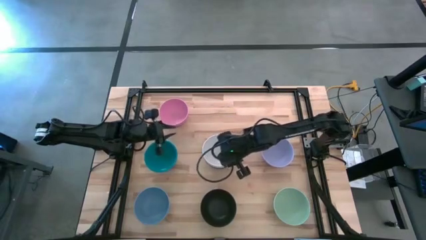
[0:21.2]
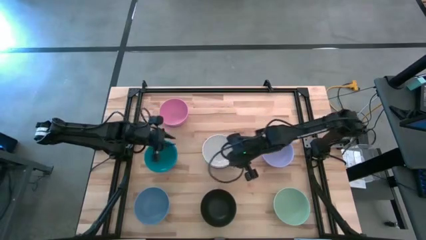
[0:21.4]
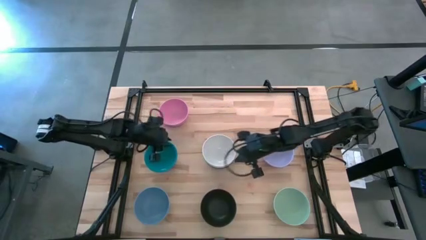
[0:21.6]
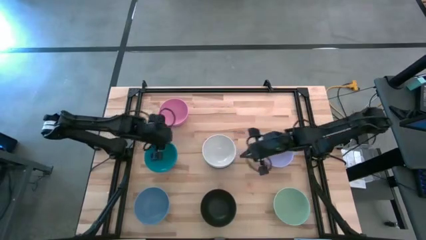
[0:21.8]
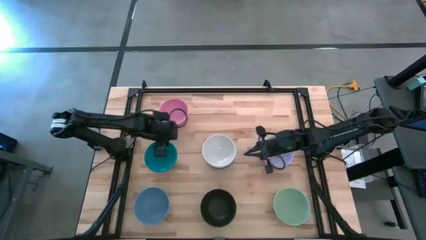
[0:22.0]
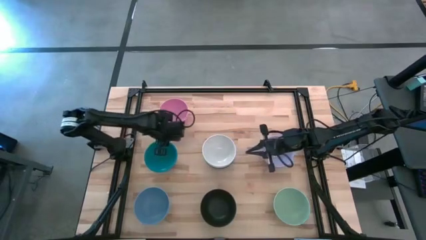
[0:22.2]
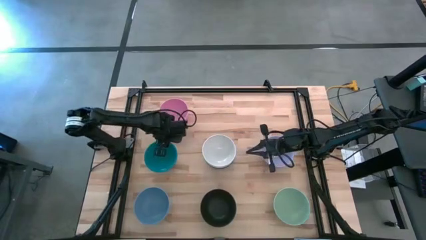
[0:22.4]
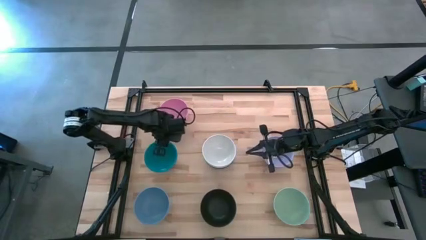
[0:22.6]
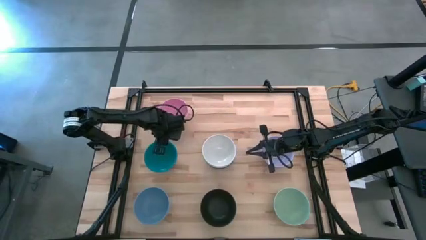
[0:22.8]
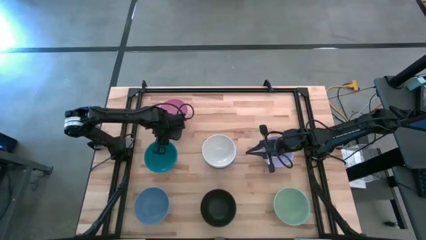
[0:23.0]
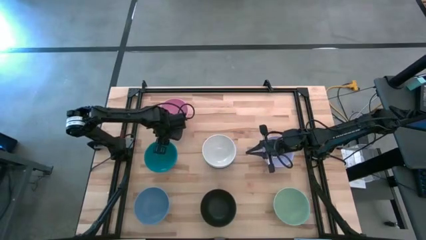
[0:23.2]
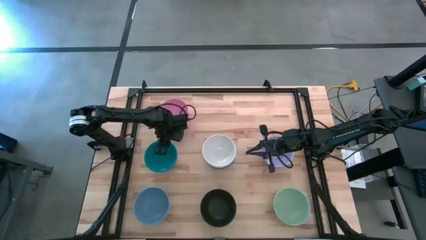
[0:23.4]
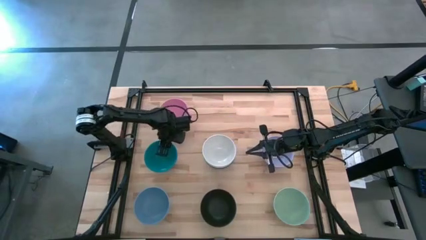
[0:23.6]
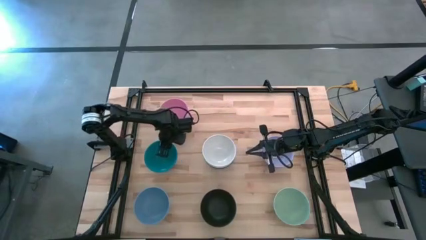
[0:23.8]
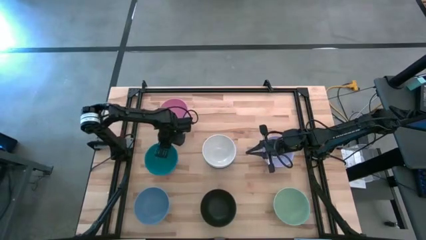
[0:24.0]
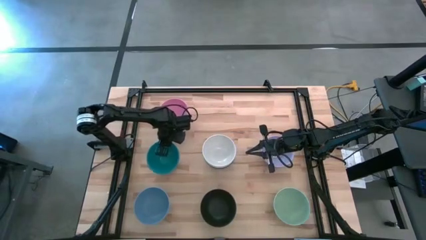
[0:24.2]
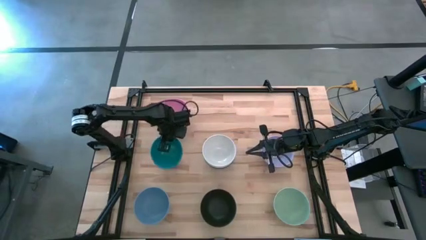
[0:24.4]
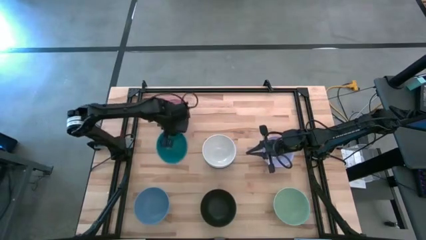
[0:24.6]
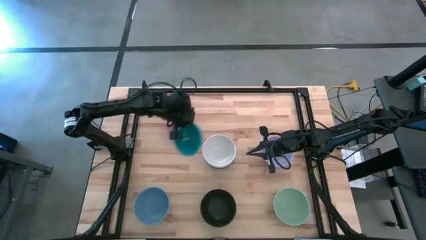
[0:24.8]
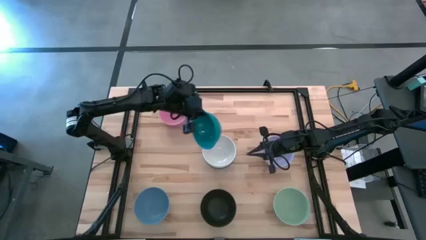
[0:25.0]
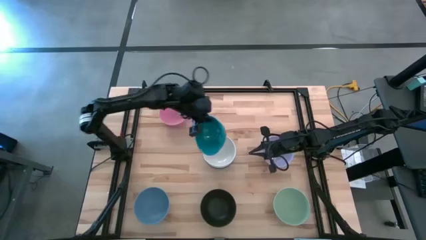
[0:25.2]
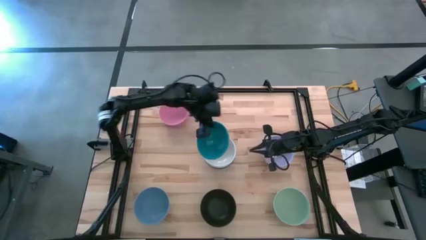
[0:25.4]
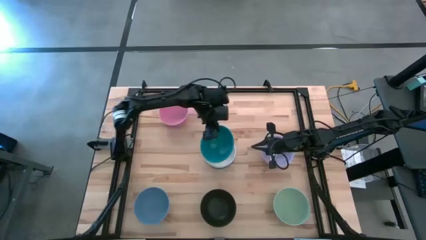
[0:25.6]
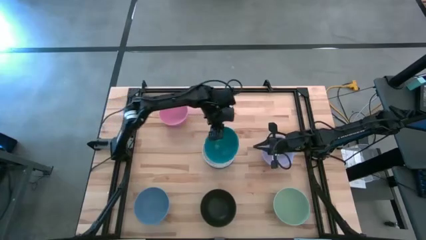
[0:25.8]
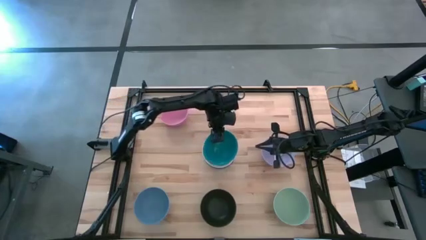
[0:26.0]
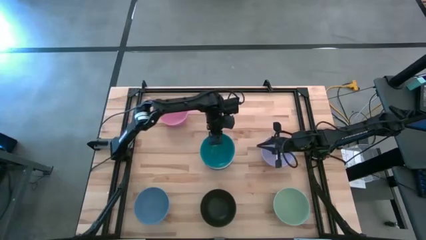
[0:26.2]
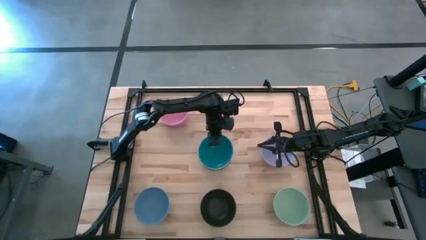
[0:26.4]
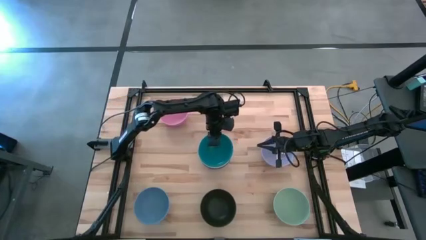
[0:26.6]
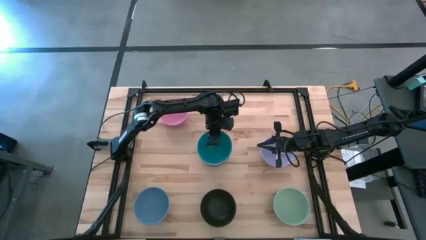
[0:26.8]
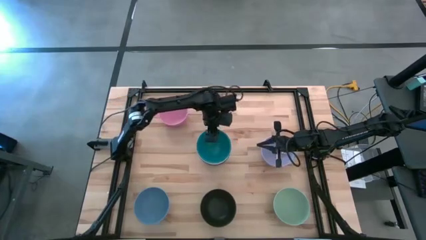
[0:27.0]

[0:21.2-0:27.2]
Task: Nest bowls inside each other
Stack the blue bowl on top of the white bowl

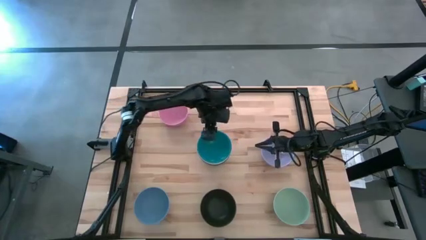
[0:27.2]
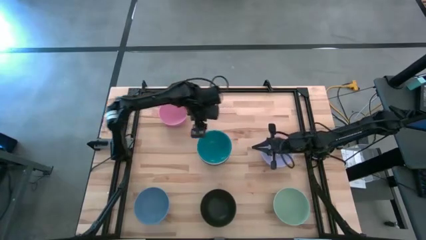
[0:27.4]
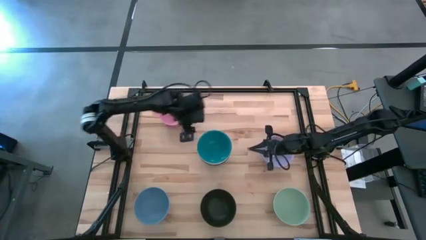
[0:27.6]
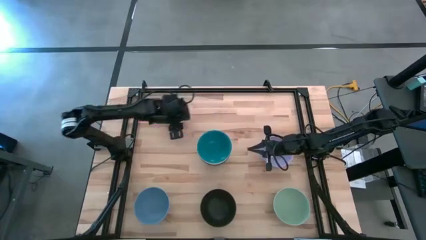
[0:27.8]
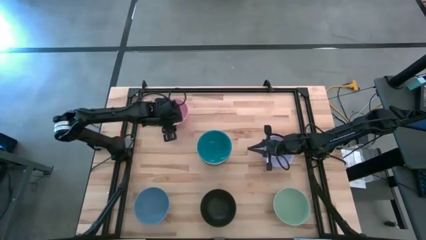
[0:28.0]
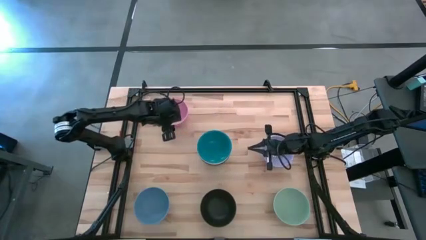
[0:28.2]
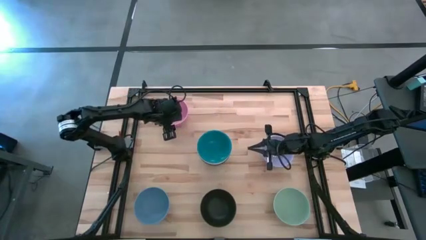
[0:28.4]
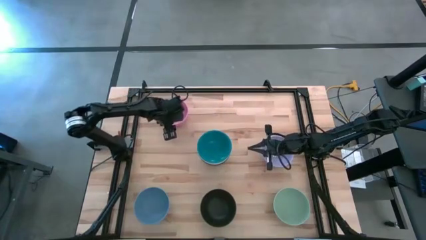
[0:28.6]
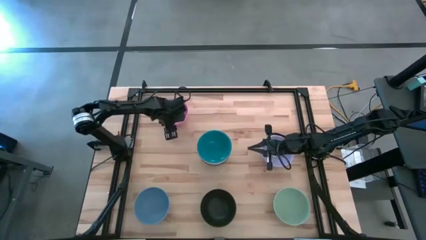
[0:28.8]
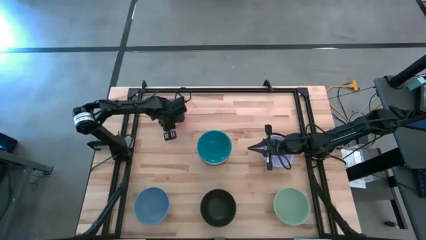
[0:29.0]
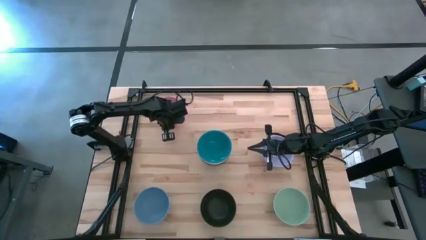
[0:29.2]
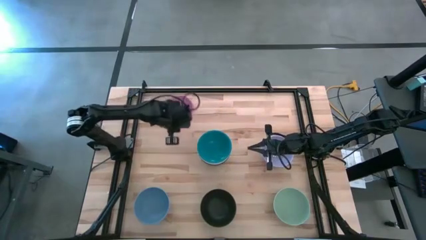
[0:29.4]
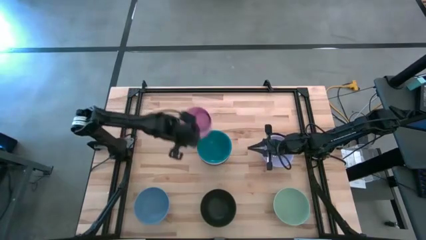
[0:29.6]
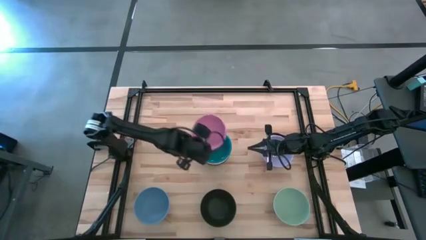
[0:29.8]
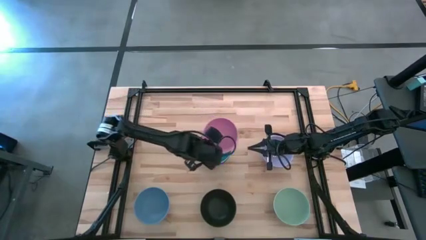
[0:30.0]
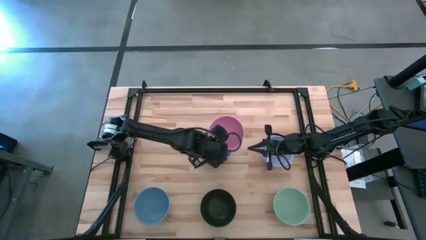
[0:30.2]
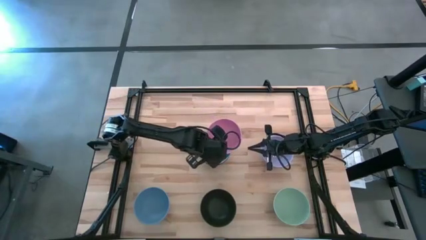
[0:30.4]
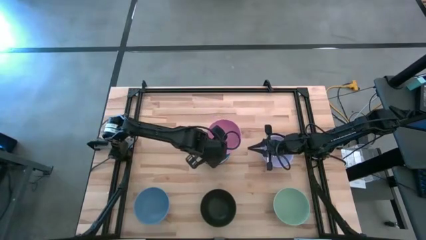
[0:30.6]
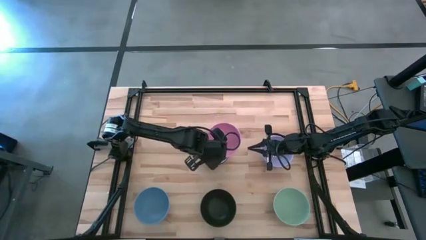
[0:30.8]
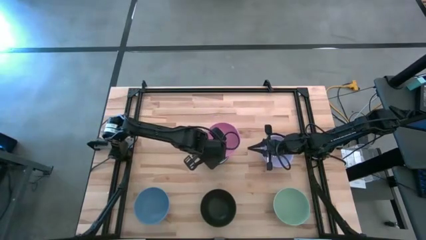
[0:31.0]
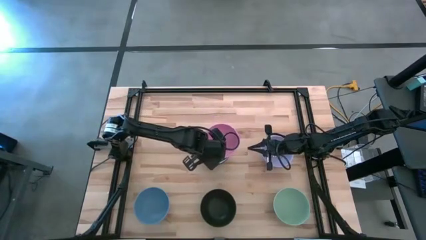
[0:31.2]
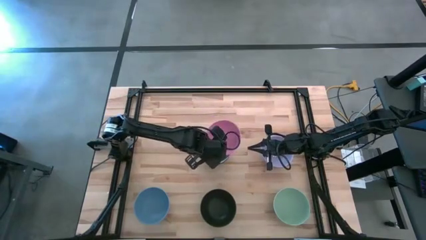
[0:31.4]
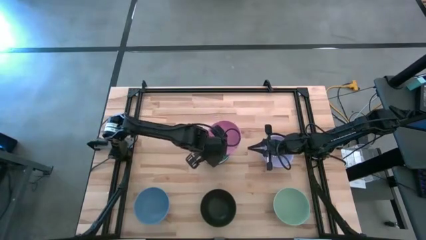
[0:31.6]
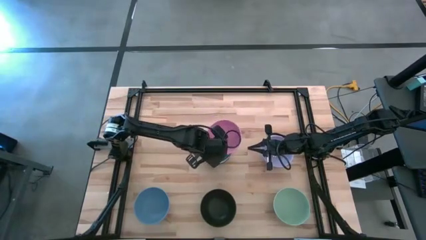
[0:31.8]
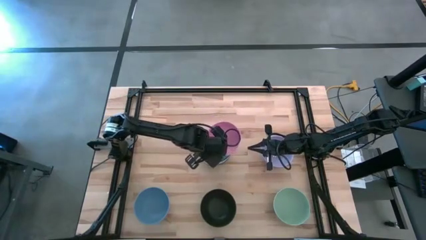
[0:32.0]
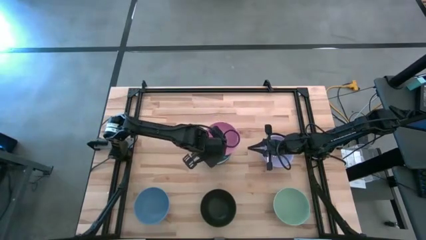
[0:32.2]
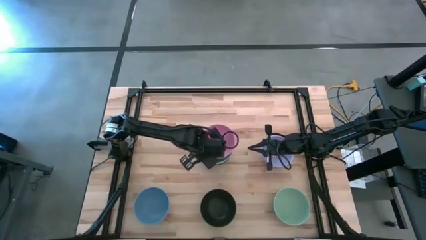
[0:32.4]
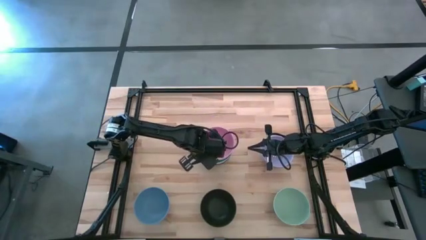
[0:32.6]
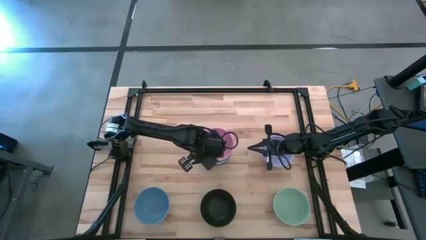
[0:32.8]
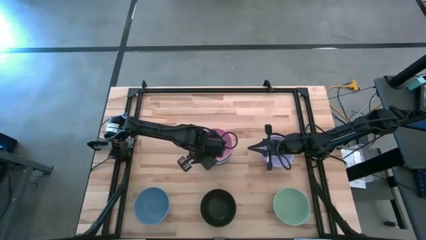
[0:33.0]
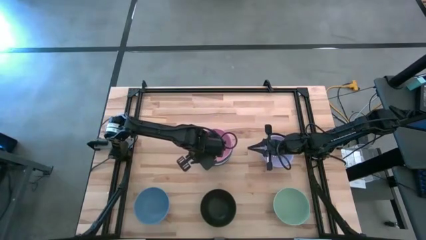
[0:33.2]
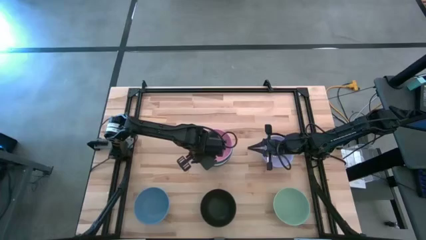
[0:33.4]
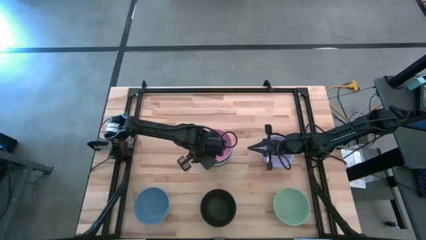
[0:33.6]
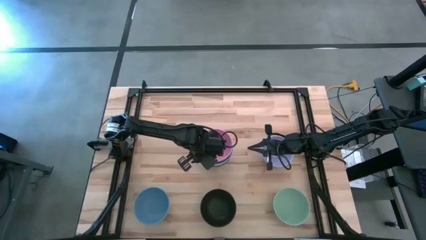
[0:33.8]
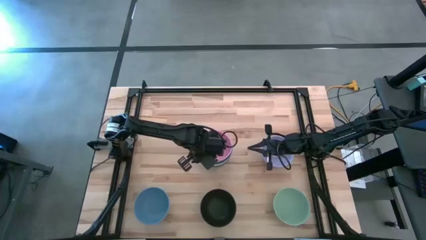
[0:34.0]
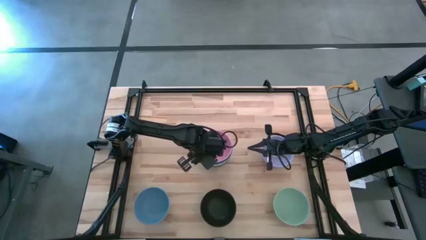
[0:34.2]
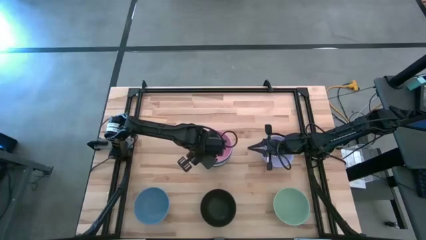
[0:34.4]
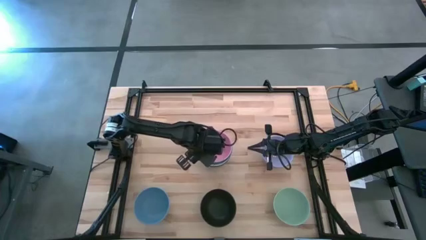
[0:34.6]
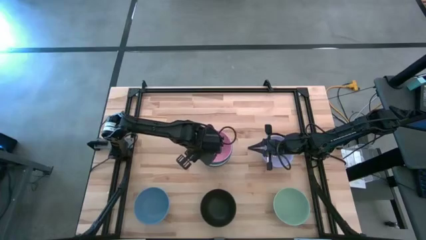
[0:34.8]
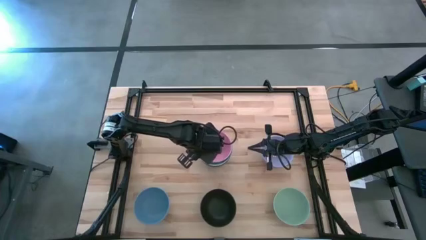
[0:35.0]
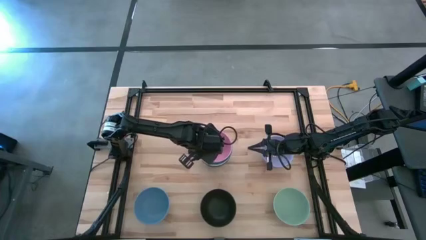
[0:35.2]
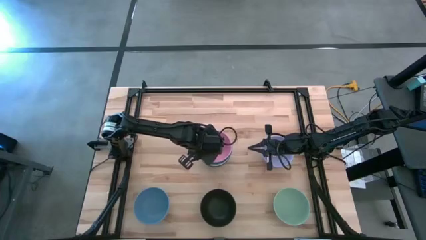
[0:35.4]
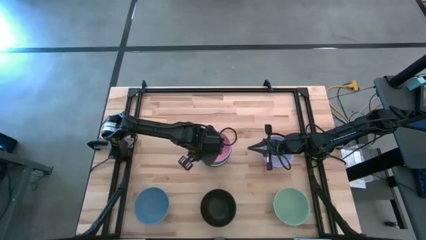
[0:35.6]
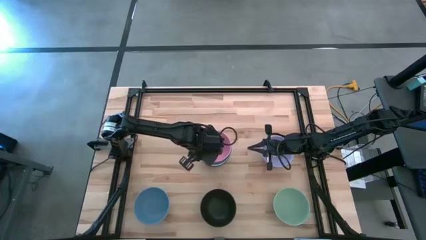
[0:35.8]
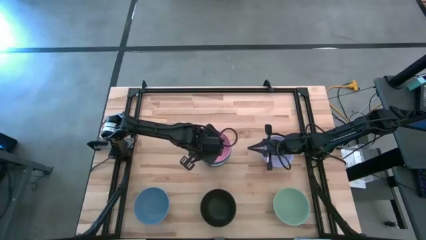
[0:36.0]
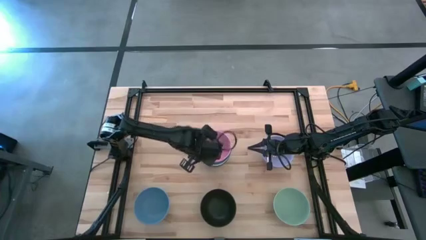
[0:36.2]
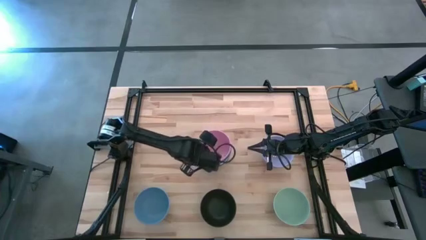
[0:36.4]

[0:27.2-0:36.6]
Stack the pink bowl on top of the blue bowl

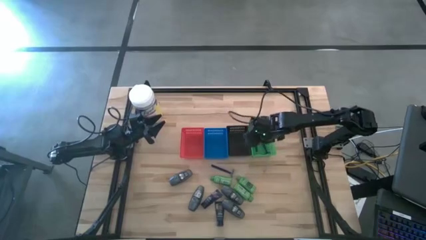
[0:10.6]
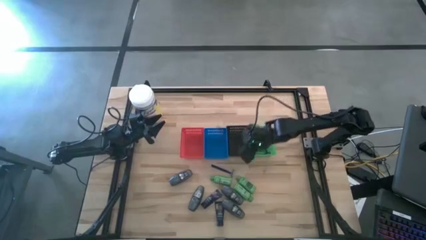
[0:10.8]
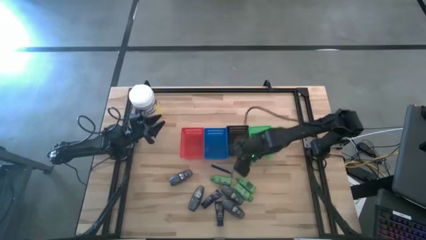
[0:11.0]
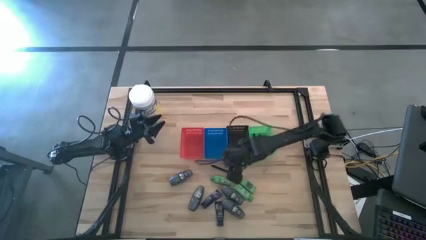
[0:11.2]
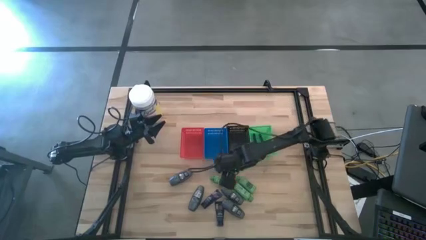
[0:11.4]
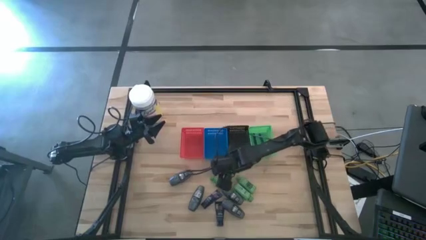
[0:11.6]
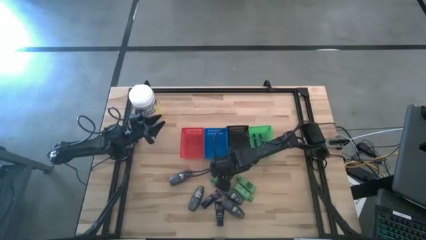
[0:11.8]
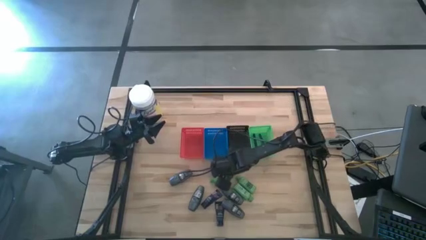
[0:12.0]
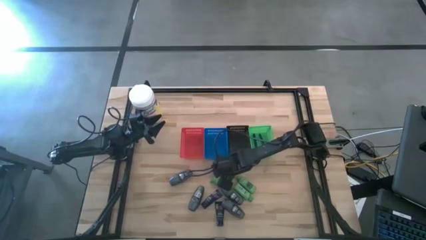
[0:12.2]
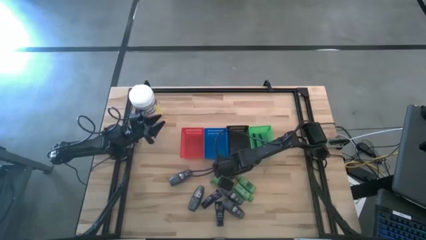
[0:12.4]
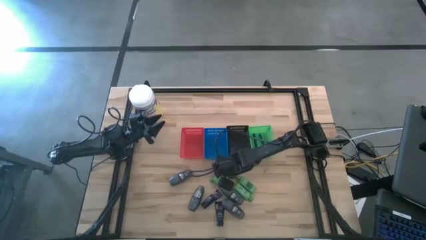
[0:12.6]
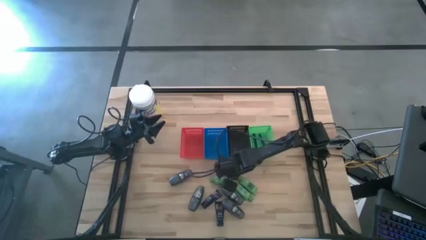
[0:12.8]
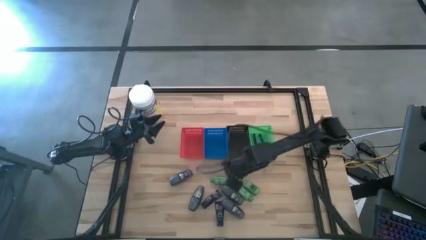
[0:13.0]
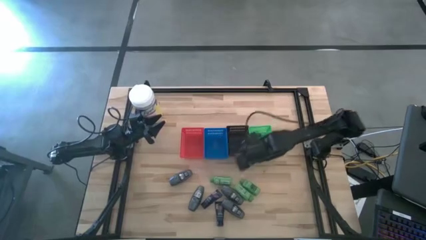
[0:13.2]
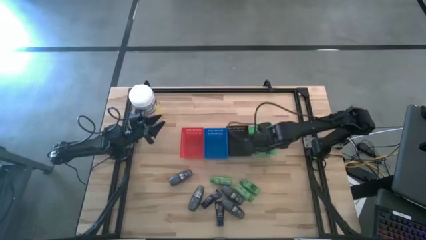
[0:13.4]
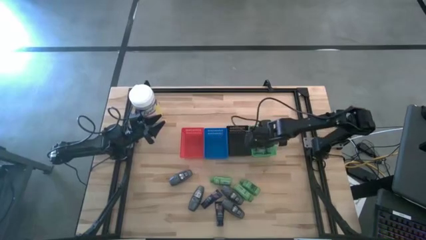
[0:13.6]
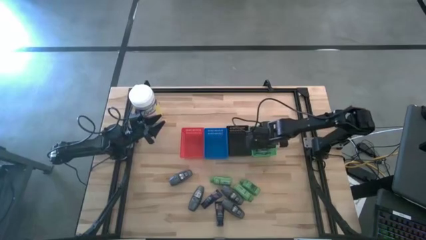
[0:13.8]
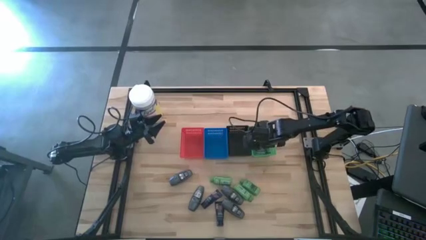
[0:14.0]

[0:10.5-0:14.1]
Task: Pick & Place Travel size toiletries
Put the blue razor into the green bin
